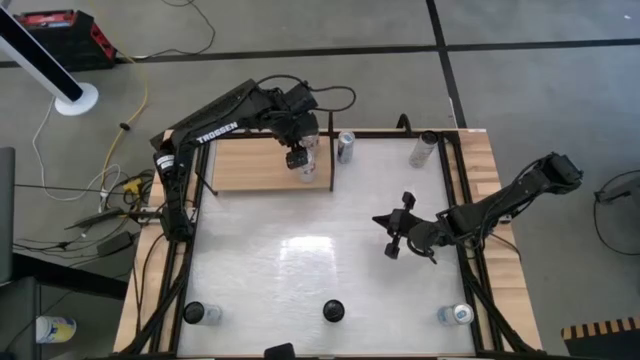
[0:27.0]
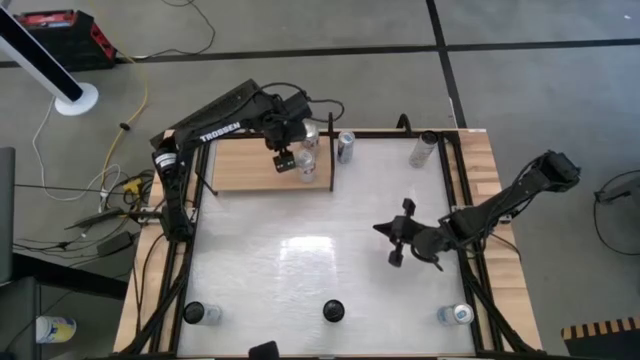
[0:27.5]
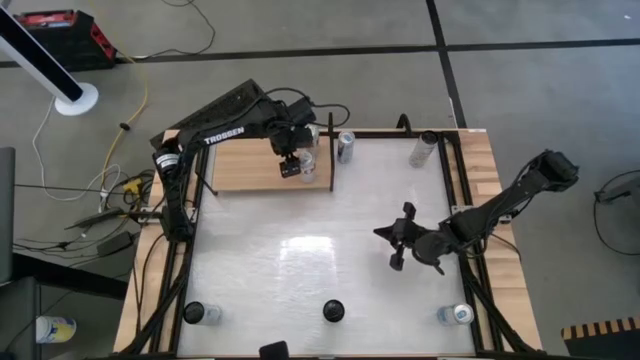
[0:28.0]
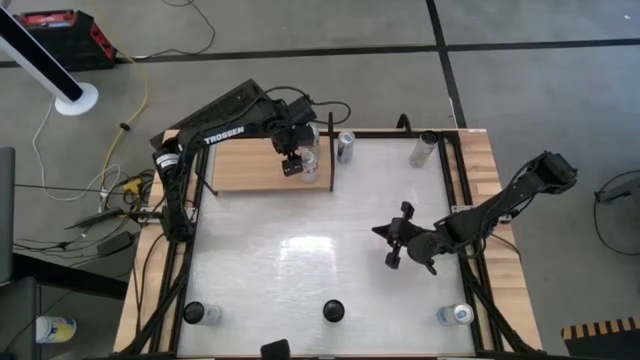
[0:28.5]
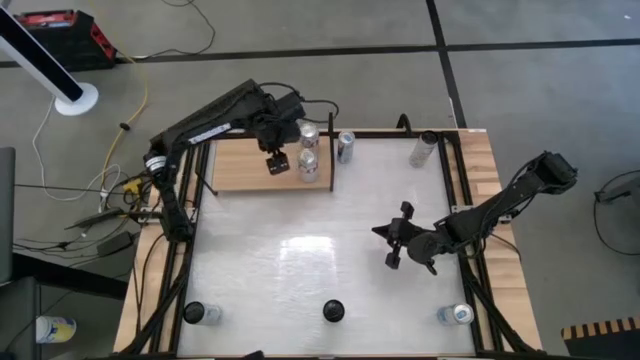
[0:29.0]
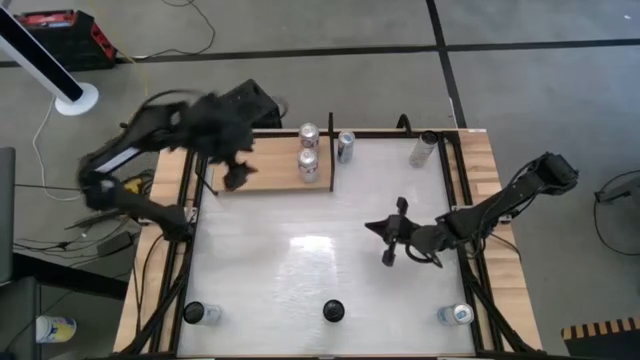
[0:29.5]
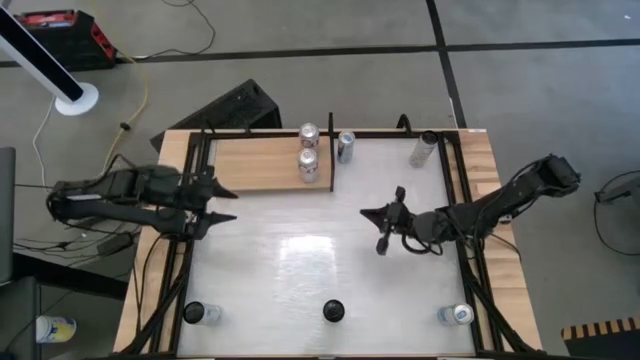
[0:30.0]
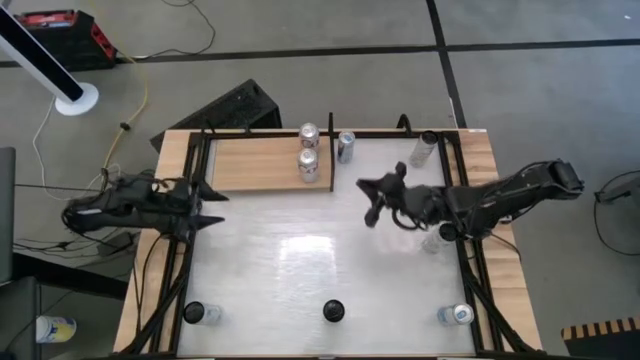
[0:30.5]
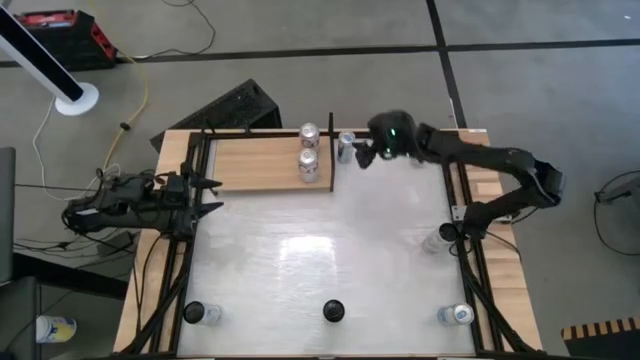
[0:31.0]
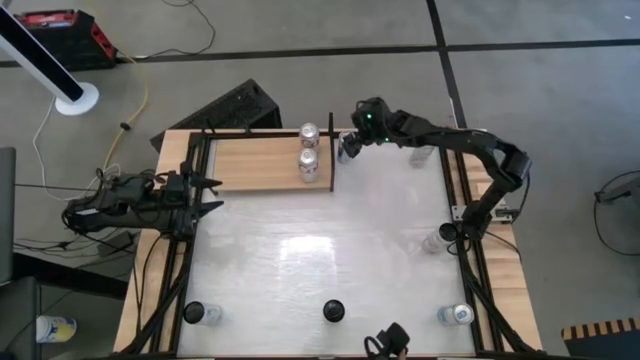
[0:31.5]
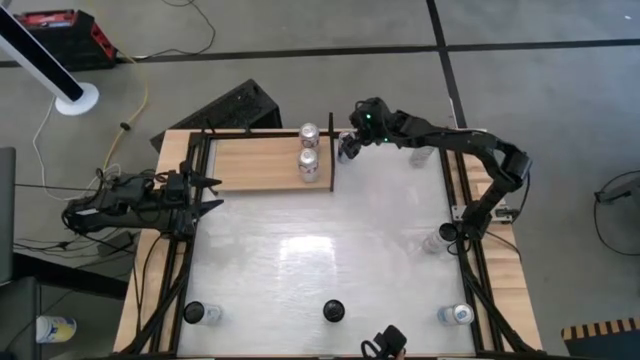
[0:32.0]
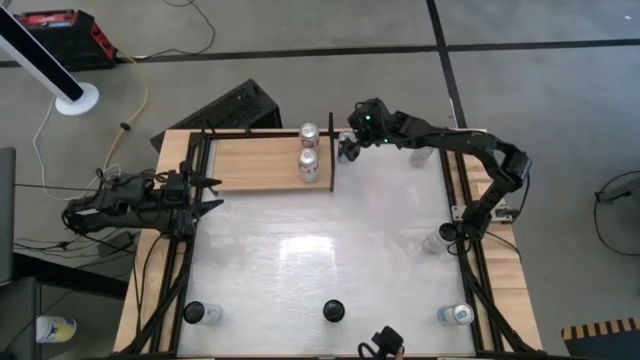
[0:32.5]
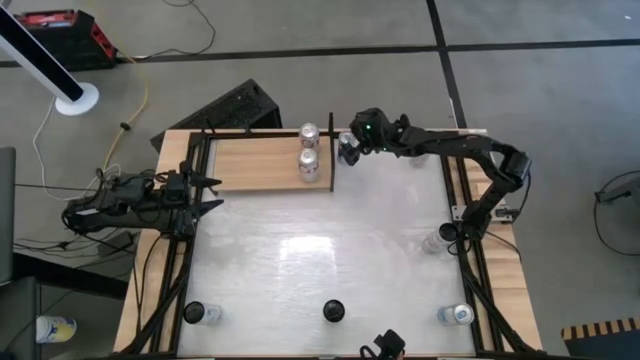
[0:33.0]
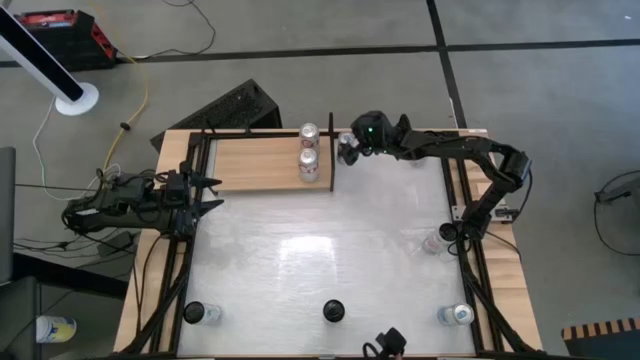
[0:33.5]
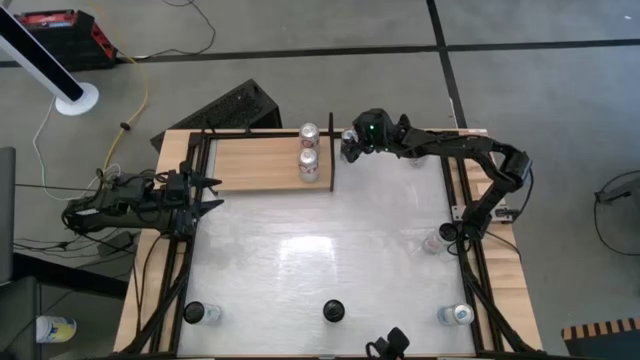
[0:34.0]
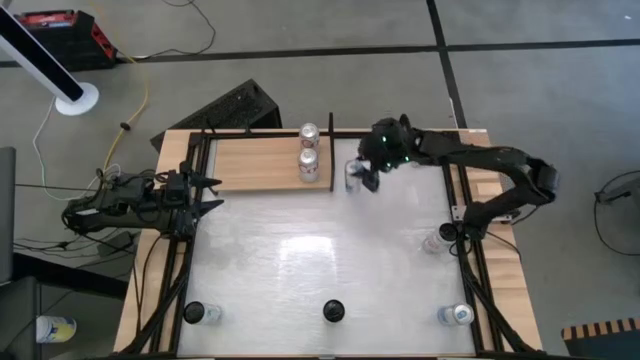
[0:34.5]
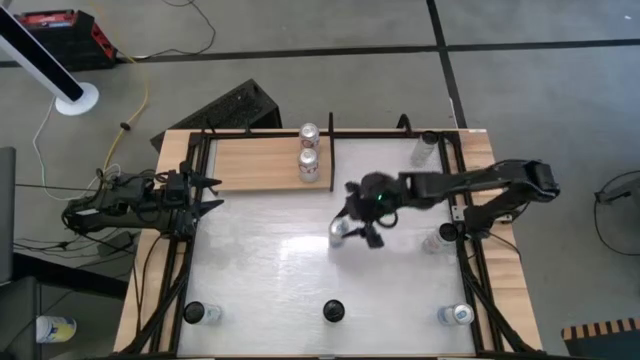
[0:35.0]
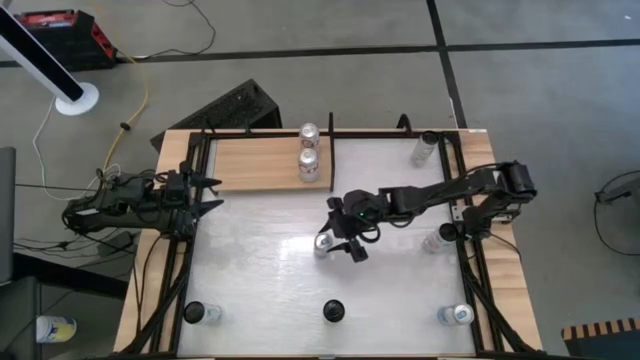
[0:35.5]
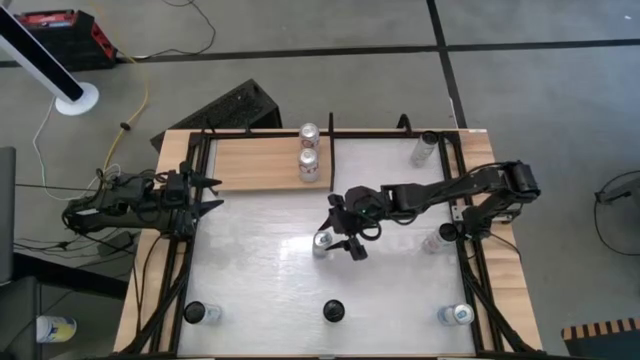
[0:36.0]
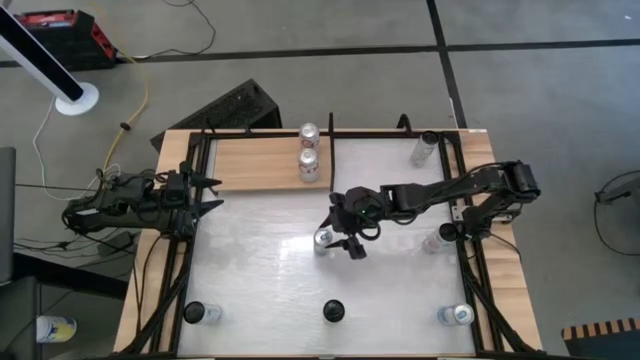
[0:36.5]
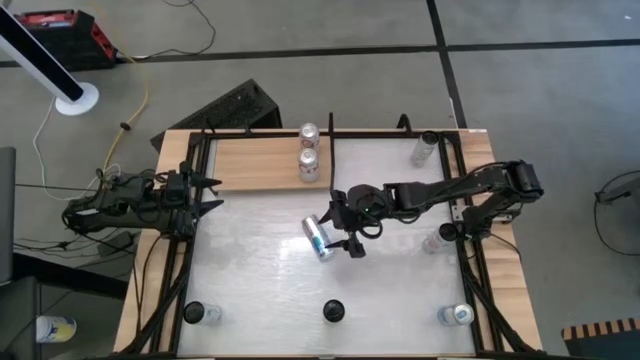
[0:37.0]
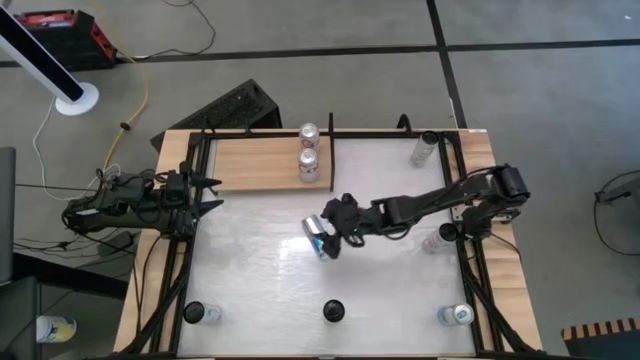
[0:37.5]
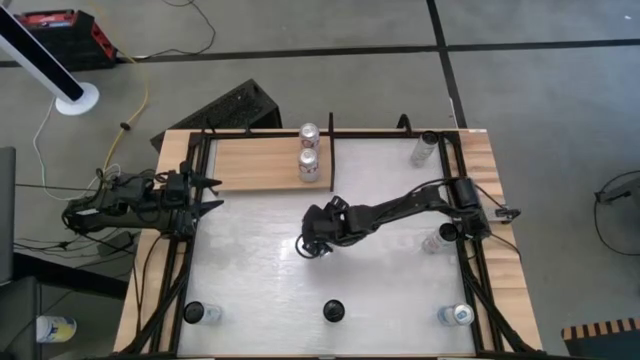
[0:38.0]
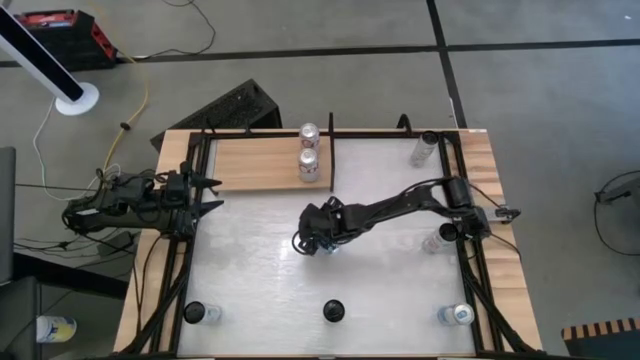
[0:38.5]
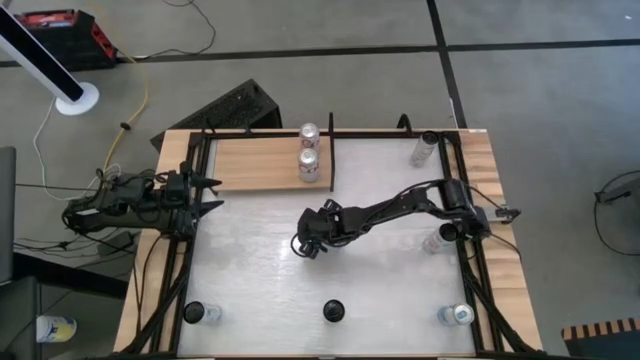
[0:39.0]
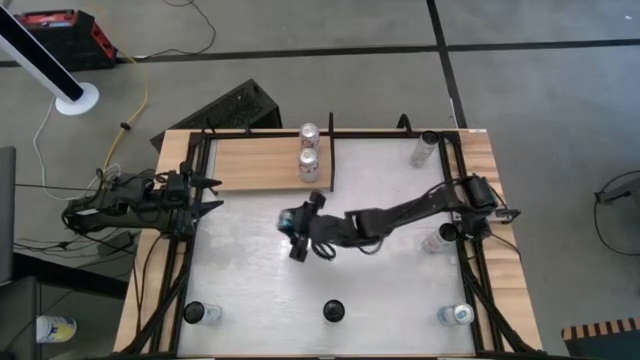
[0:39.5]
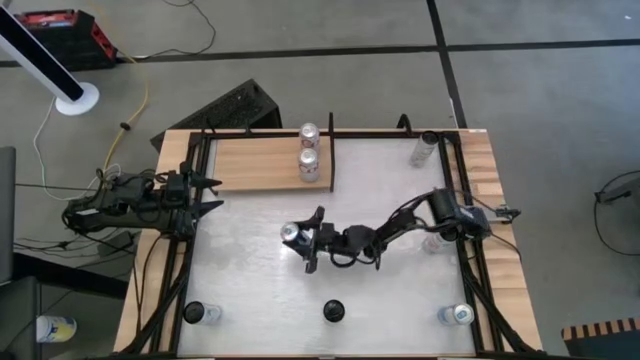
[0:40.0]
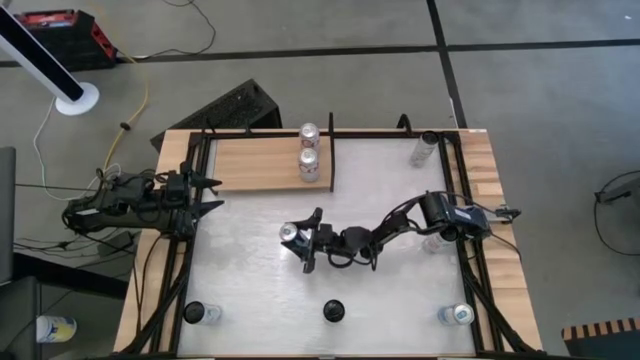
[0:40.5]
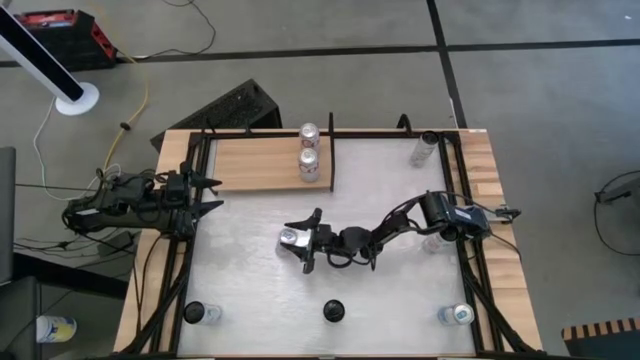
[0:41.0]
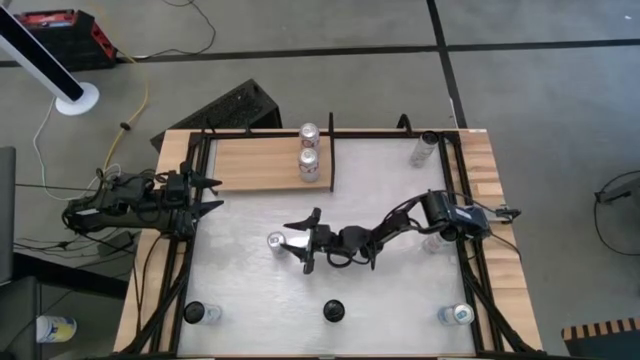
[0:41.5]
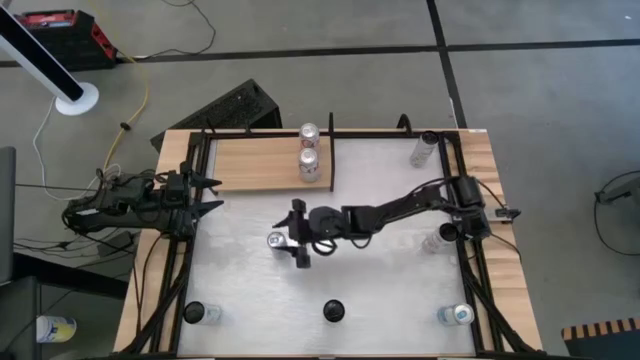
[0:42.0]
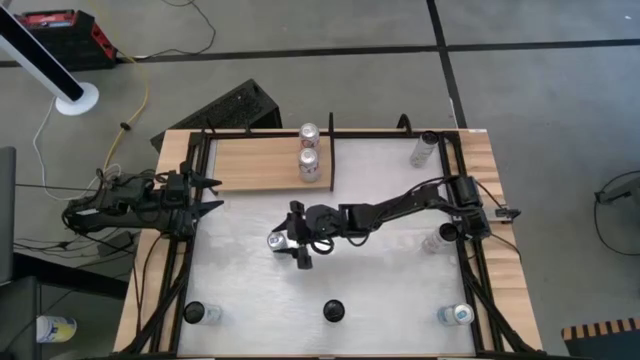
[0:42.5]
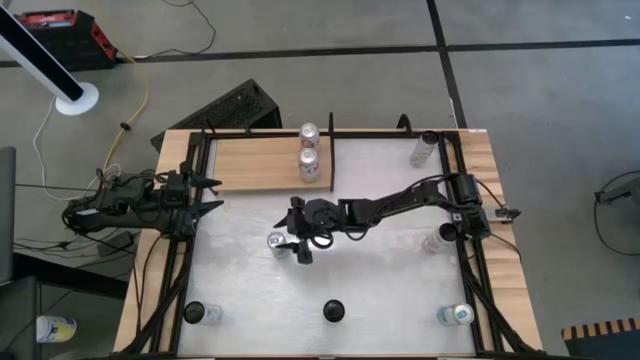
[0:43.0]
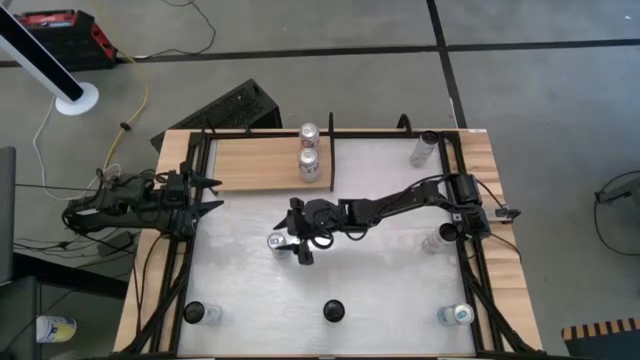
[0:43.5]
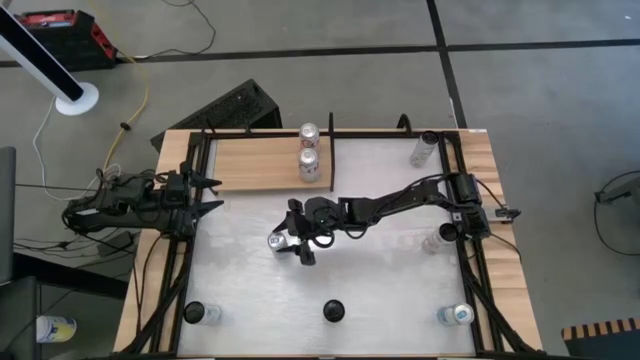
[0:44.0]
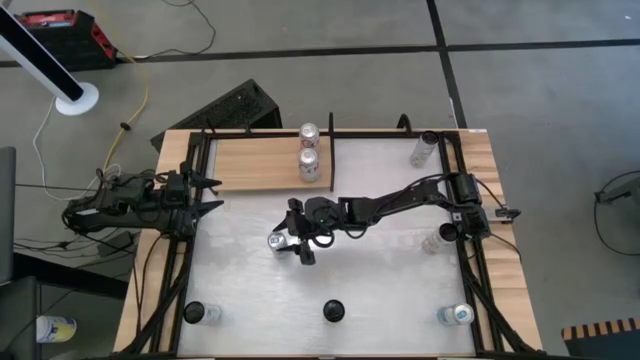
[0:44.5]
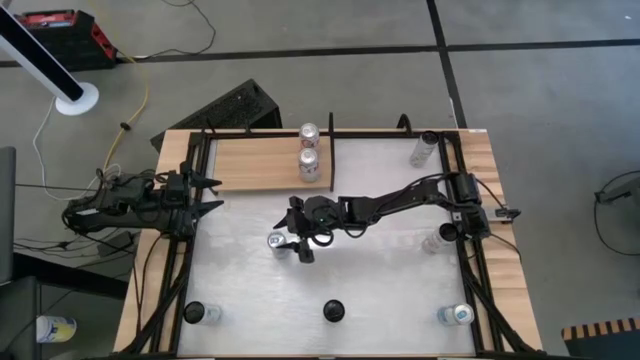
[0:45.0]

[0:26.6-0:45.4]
Task: Place canned beverage on shelf
Put the top blue soda can on the shelf
